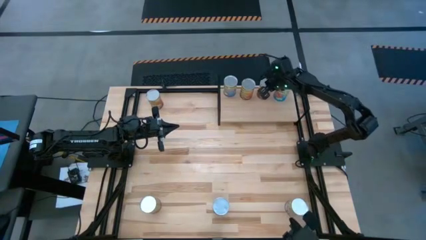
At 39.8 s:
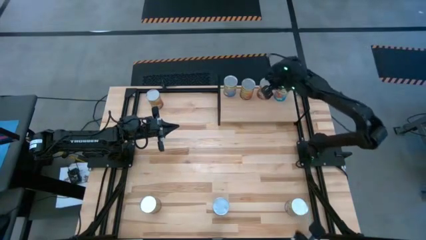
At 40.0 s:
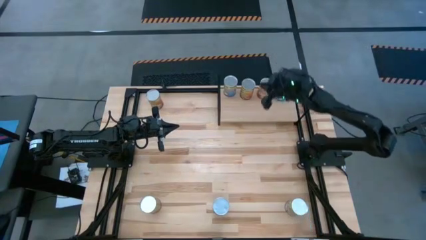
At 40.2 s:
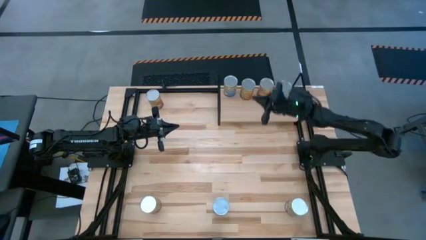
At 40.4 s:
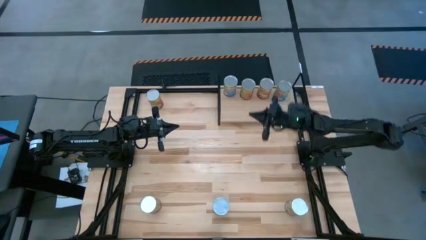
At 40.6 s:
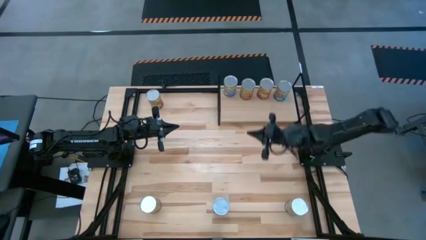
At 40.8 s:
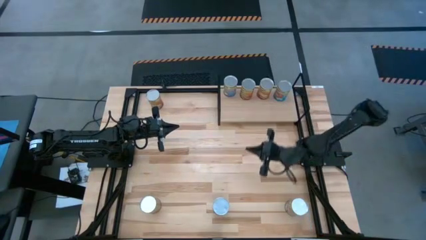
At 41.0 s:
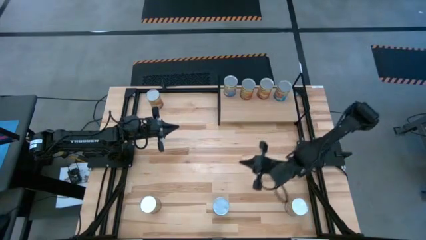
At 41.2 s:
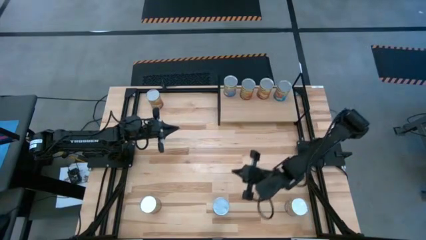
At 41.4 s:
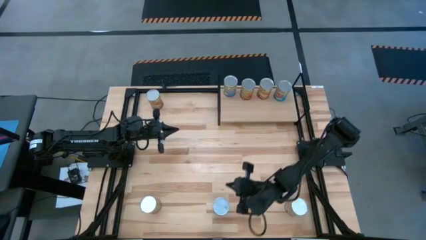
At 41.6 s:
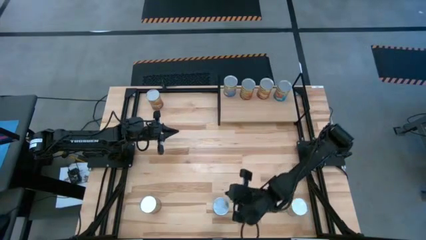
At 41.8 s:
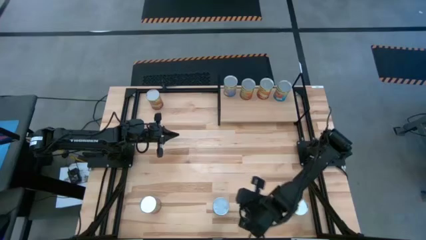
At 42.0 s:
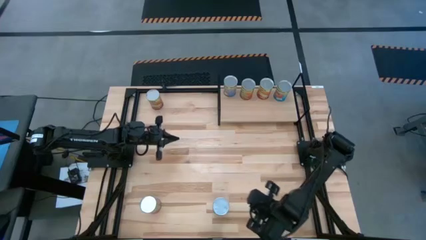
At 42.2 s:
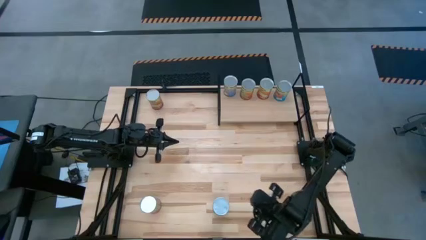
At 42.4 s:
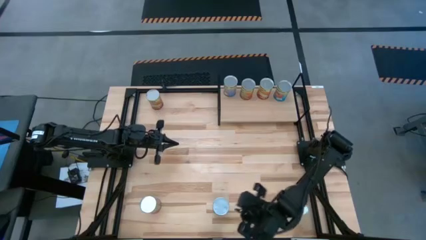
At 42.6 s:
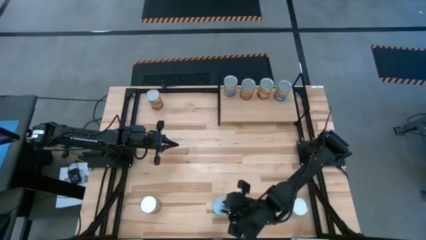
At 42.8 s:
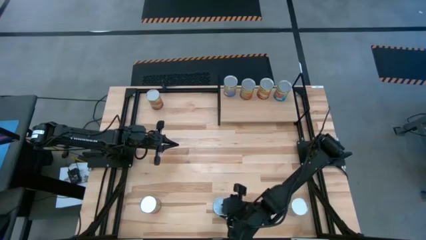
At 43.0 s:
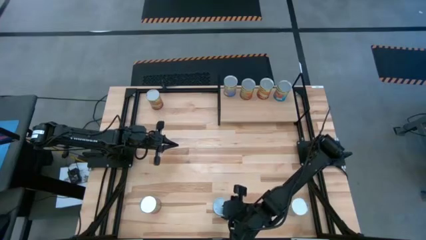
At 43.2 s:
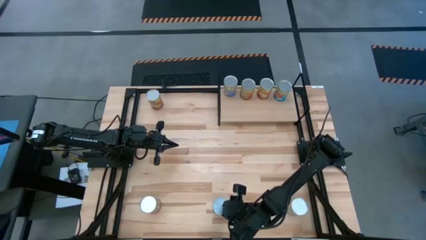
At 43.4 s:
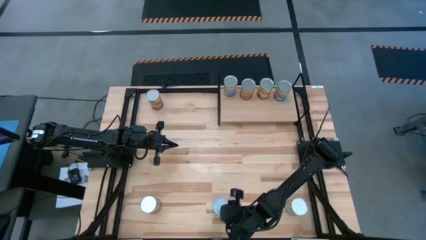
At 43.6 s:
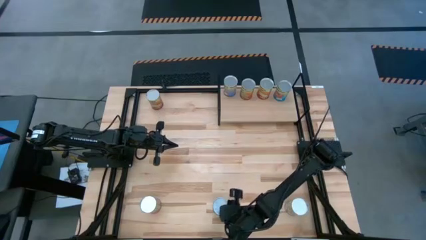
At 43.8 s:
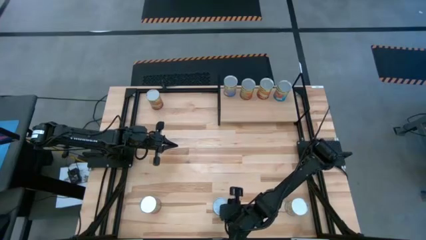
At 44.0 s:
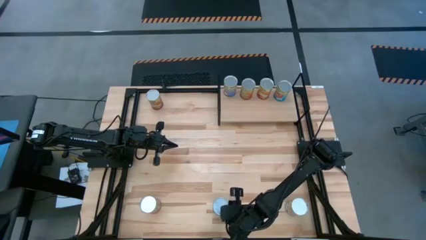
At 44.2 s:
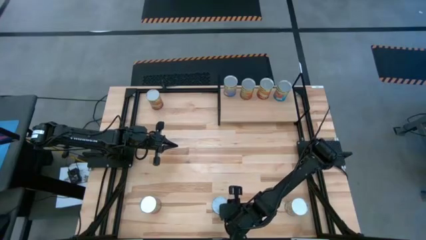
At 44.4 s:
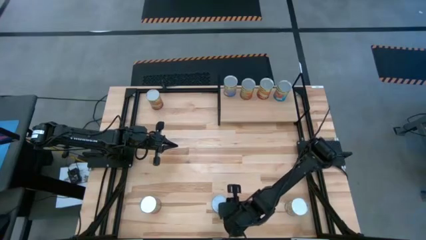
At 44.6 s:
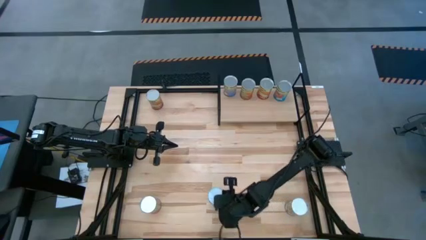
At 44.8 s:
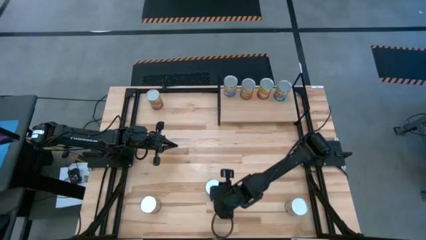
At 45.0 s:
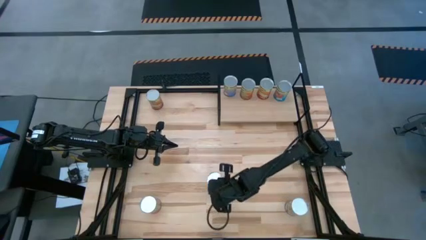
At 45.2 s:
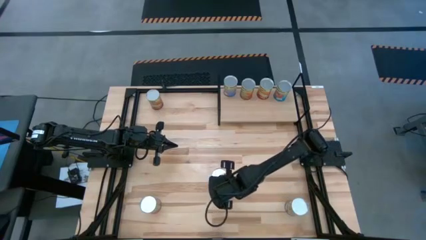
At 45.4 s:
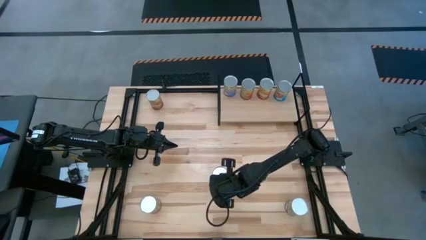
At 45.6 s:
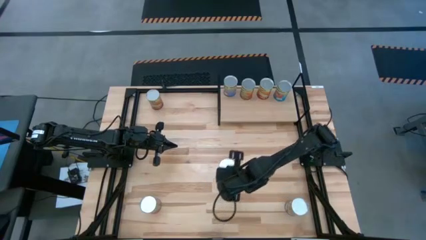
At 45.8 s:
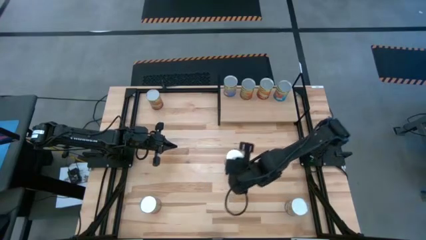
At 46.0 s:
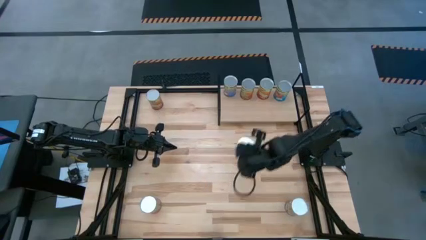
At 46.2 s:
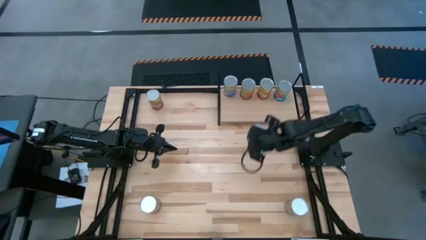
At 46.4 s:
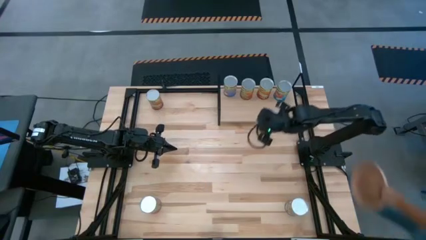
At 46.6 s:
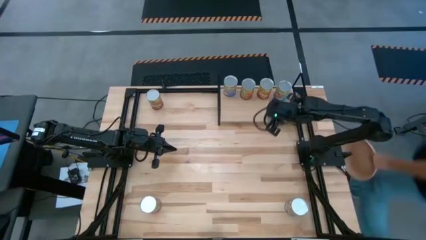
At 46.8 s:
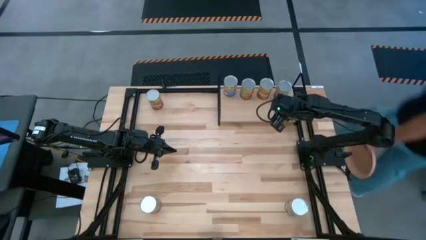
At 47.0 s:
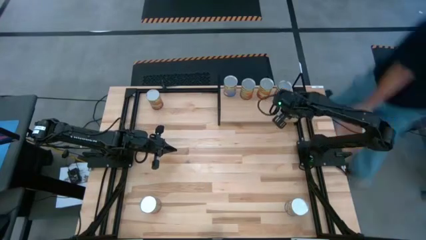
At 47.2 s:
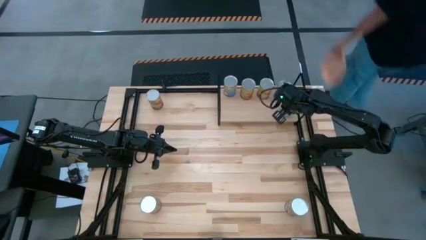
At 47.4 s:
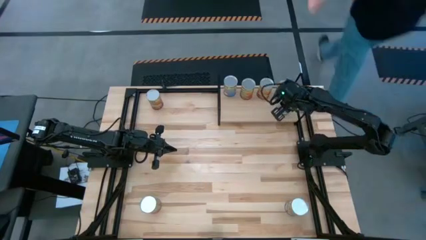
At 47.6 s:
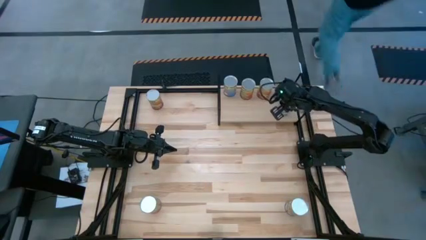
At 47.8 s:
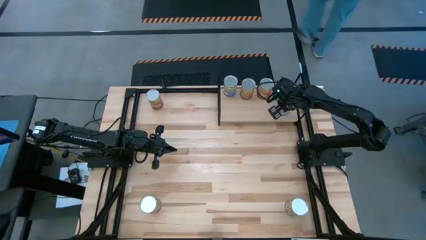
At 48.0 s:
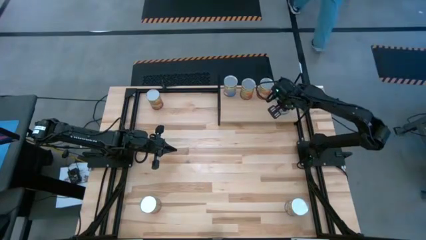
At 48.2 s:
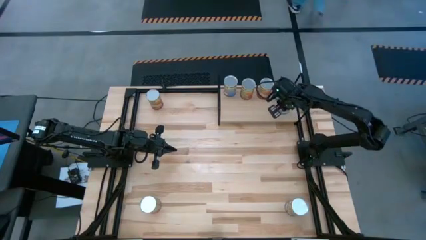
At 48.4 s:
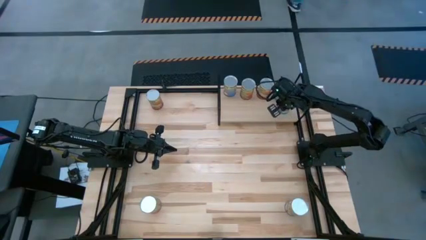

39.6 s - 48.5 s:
Task: Pick and place cans onto a shelf
Put the canned tomatoes on the shelf aligned with the other canned tomatoes

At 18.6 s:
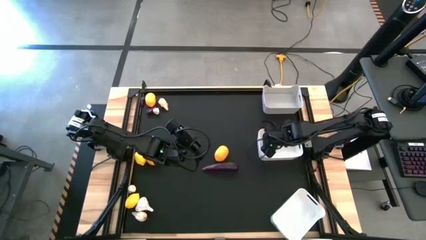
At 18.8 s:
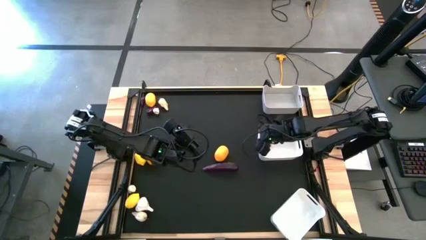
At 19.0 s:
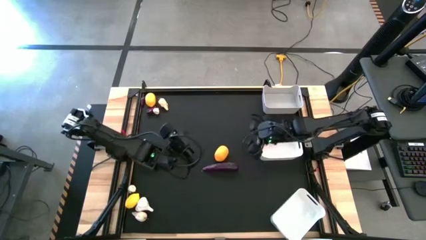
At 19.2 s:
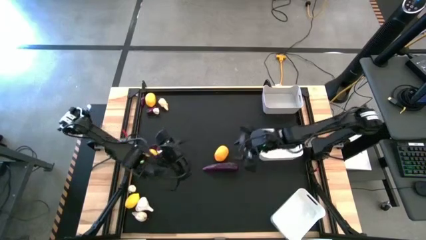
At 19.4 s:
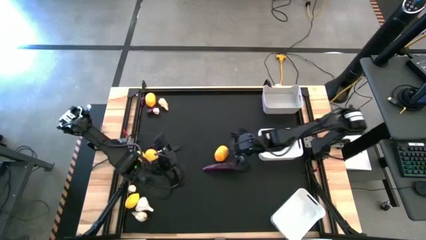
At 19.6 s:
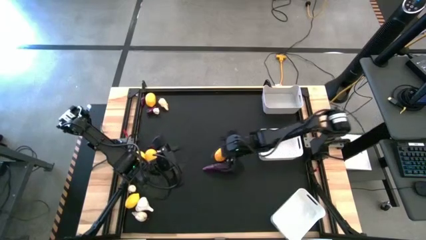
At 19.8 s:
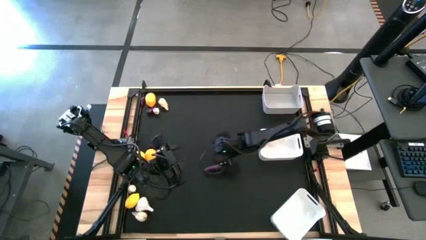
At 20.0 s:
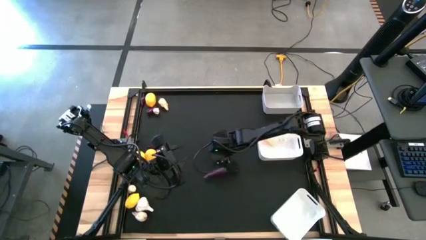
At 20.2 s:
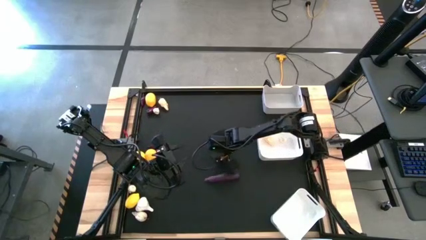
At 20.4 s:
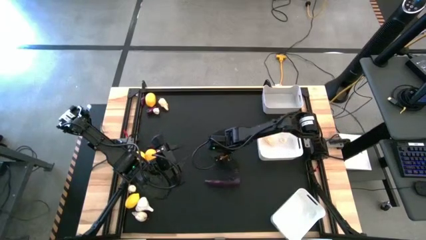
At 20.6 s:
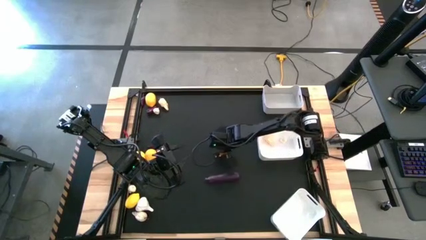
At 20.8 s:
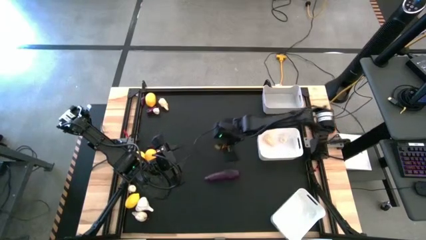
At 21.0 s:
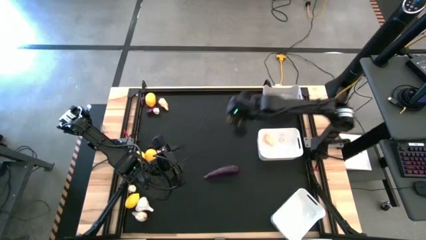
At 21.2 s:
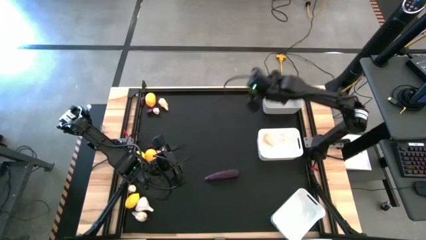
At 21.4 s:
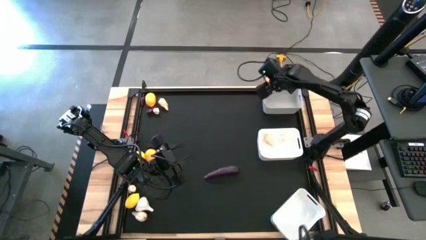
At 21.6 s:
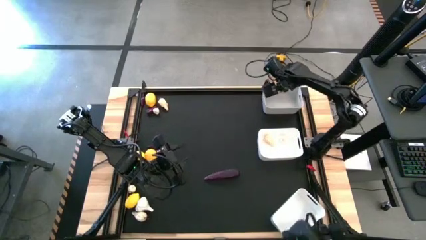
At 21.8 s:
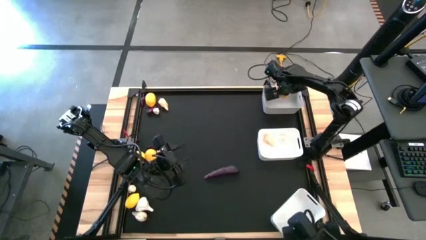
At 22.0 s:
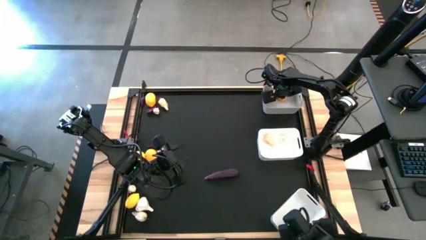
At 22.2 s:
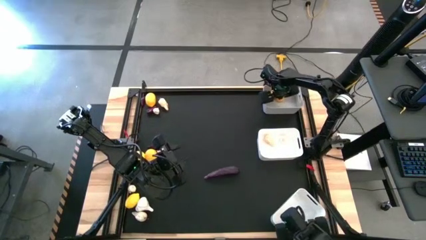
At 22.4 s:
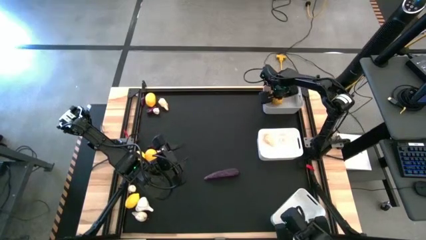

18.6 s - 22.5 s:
Task: Sort produce into baskets
Put the lemon into the gray bin

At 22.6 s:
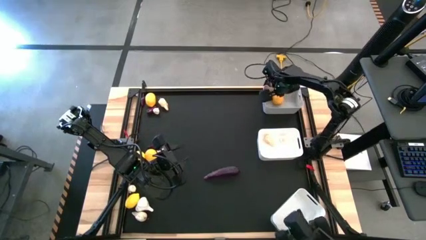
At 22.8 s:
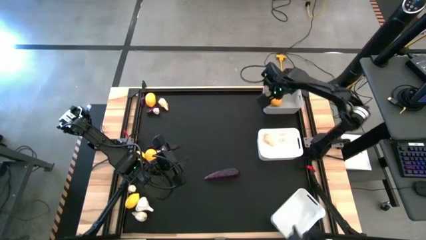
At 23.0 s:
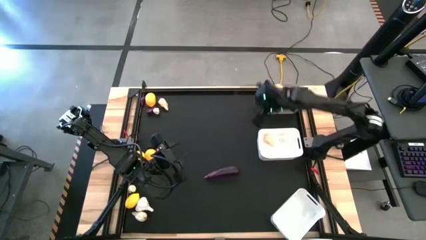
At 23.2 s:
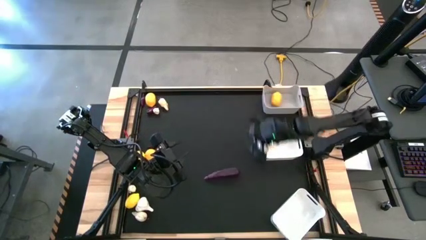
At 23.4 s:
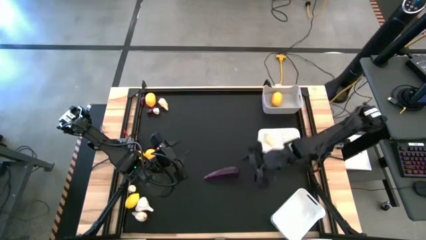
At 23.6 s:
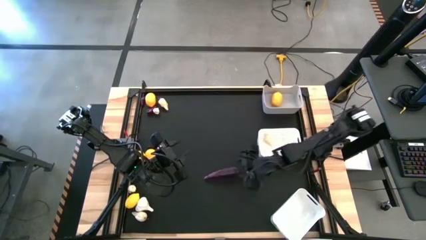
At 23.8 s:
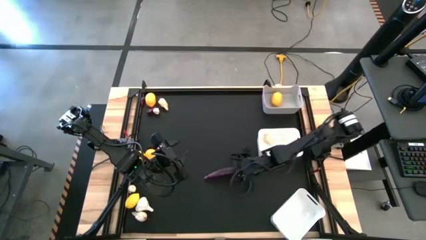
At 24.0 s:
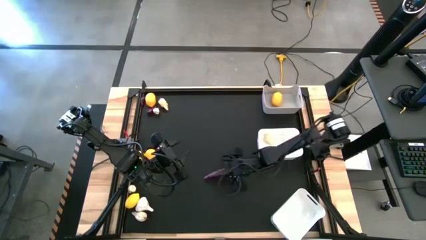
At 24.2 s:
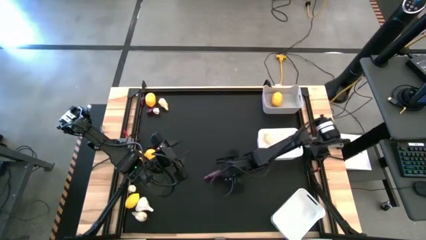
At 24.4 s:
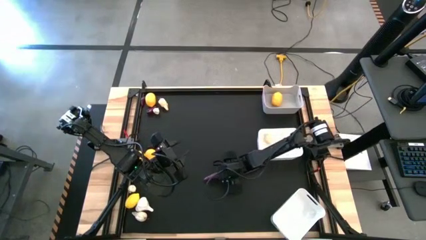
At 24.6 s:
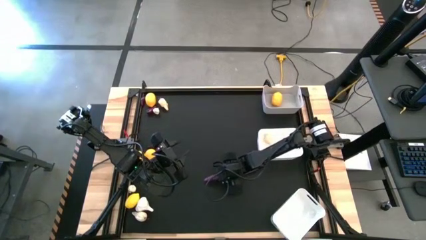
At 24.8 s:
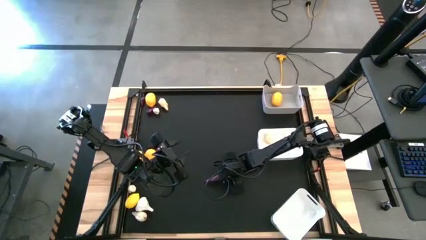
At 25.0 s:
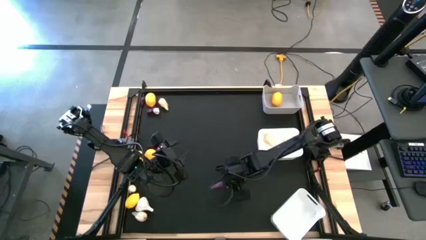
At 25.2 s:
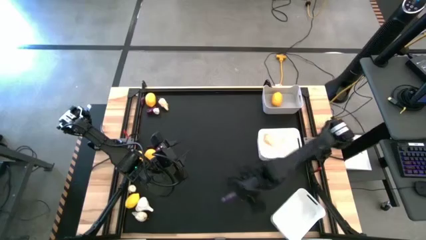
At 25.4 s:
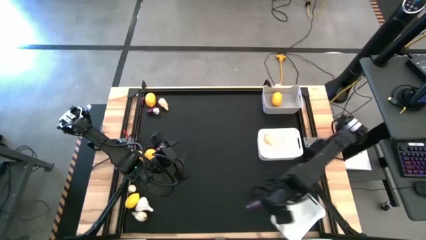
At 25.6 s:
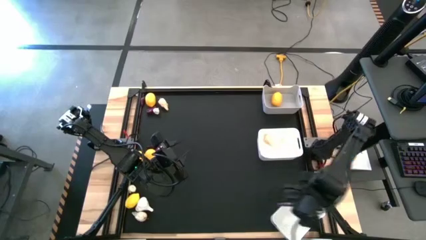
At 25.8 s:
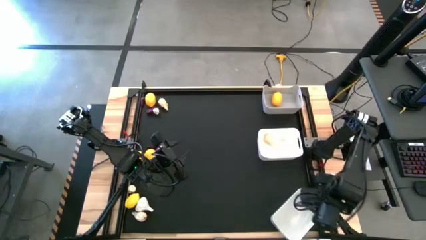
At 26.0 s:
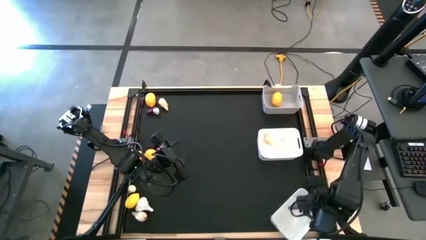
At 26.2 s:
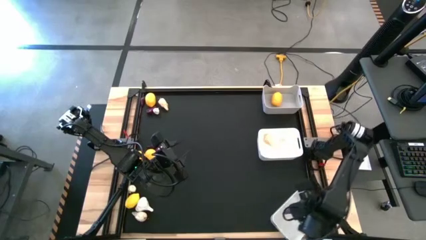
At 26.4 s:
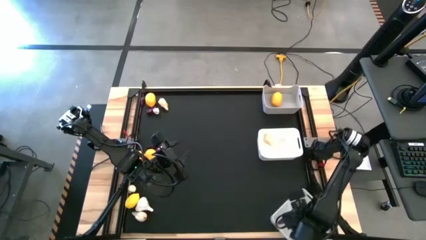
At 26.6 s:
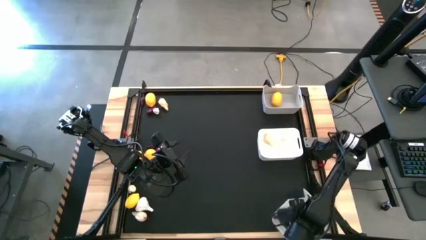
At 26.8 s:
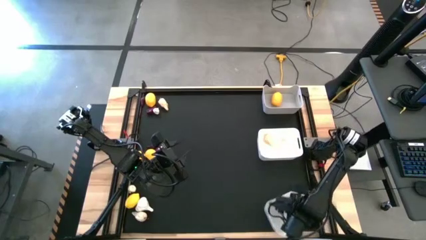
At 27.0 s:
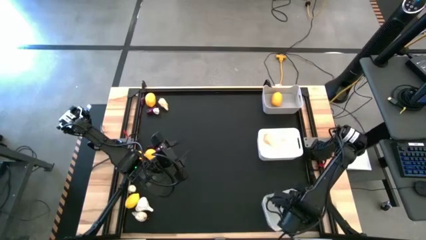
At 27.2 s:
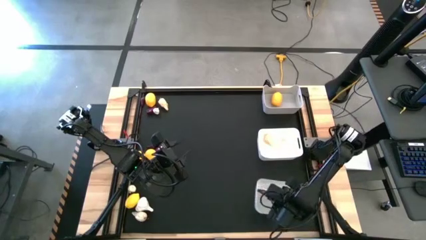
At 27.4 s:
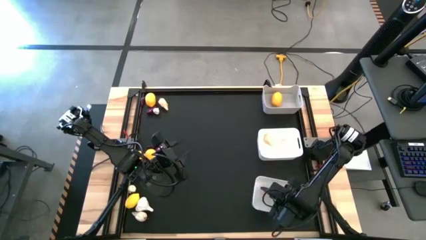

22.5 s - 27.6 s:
Put the eggplant into the bottom white bin
